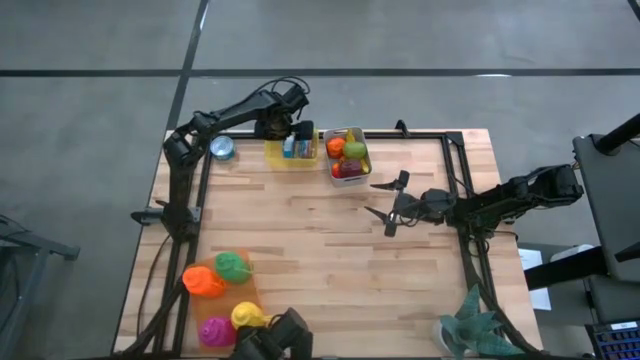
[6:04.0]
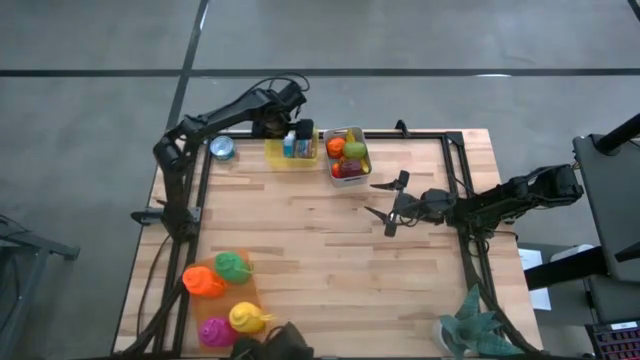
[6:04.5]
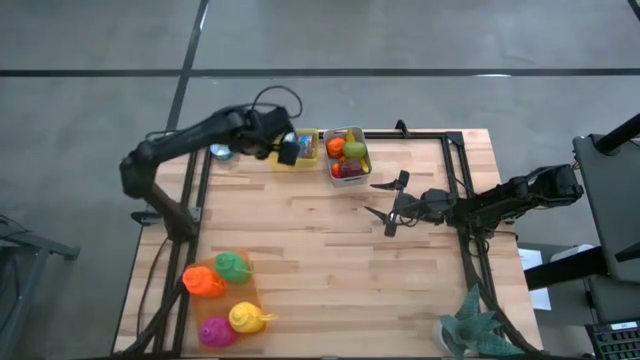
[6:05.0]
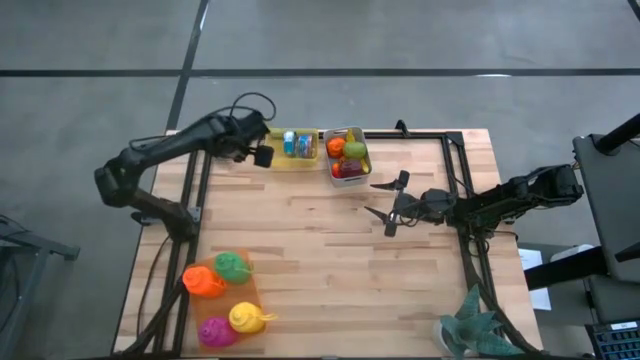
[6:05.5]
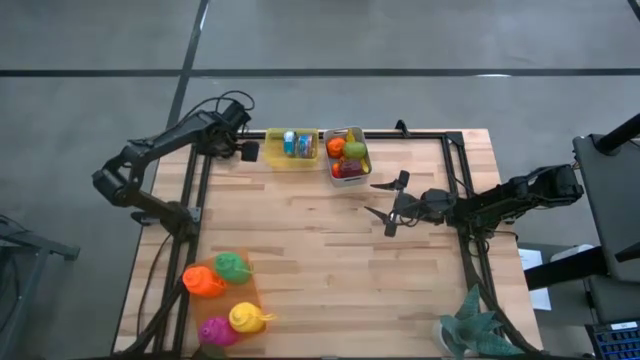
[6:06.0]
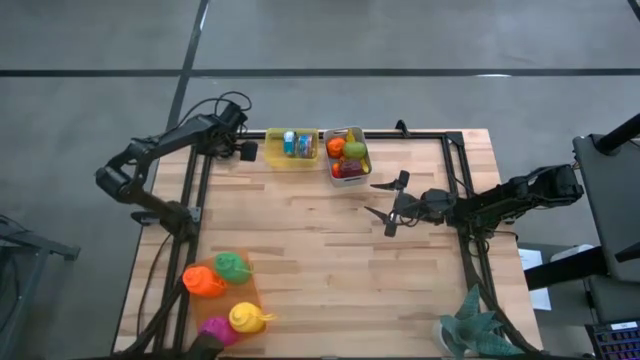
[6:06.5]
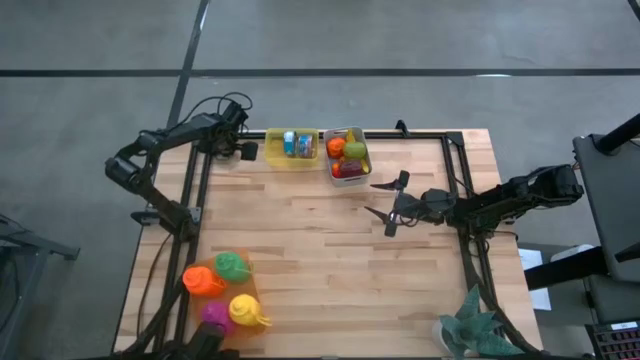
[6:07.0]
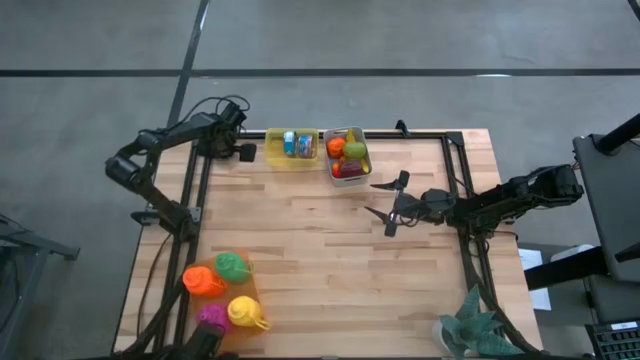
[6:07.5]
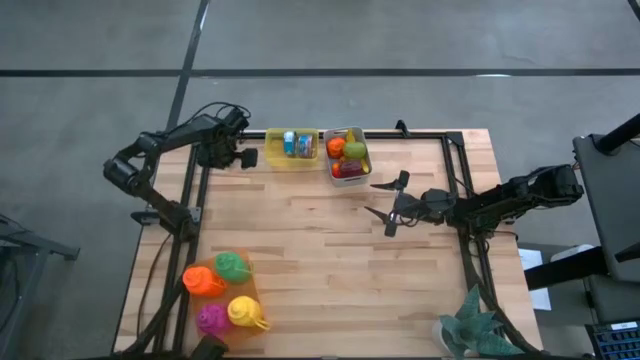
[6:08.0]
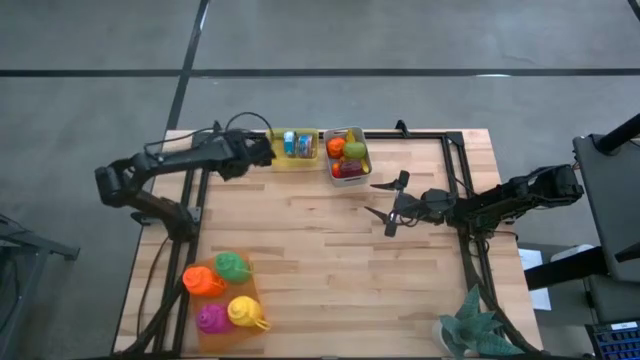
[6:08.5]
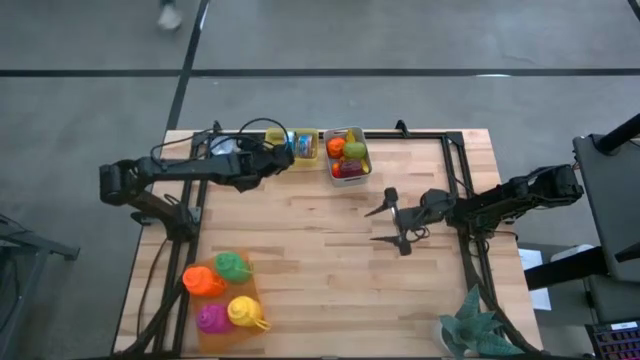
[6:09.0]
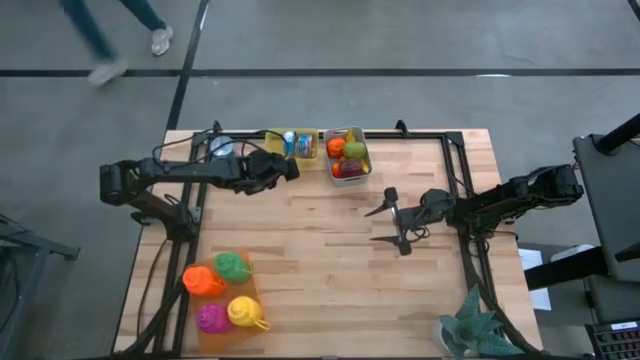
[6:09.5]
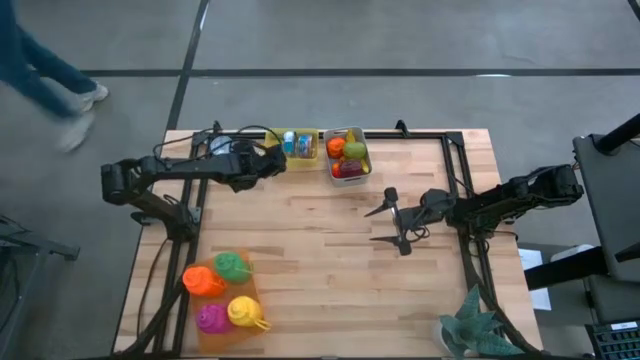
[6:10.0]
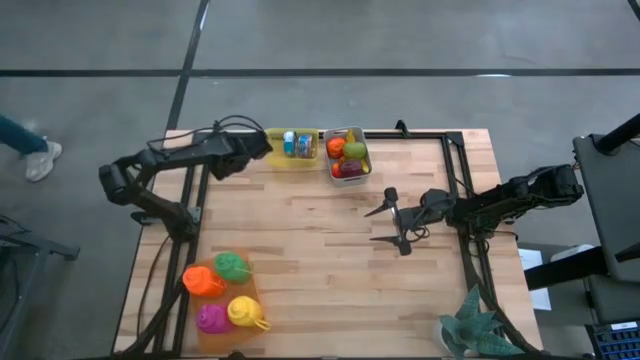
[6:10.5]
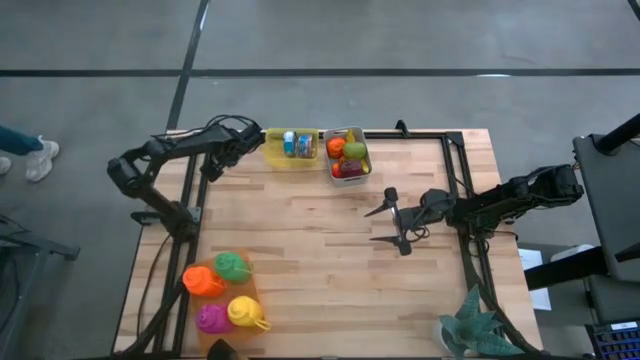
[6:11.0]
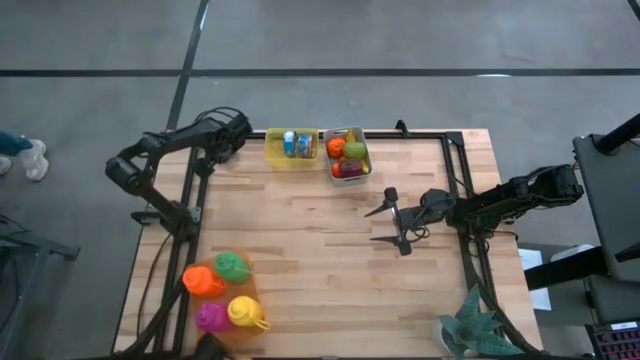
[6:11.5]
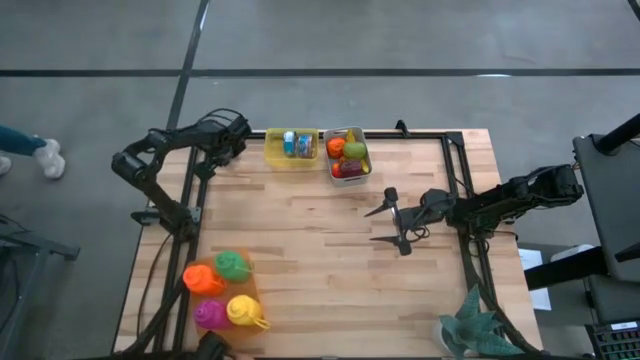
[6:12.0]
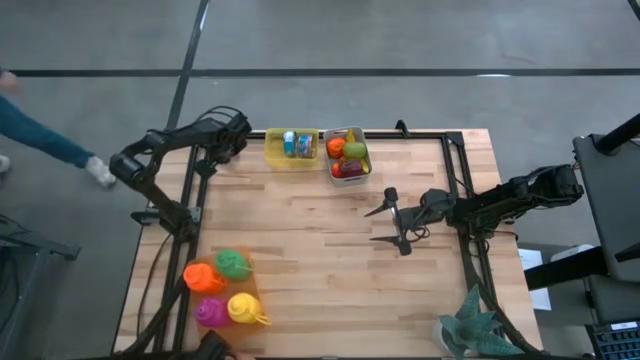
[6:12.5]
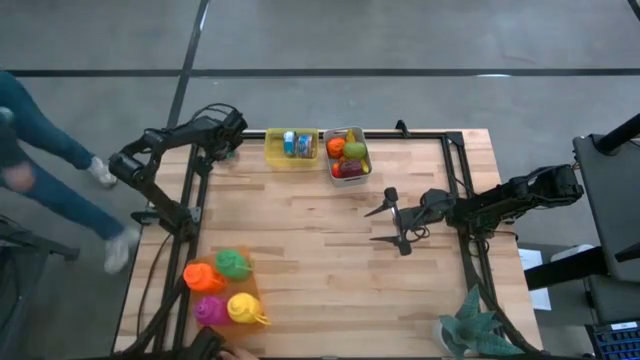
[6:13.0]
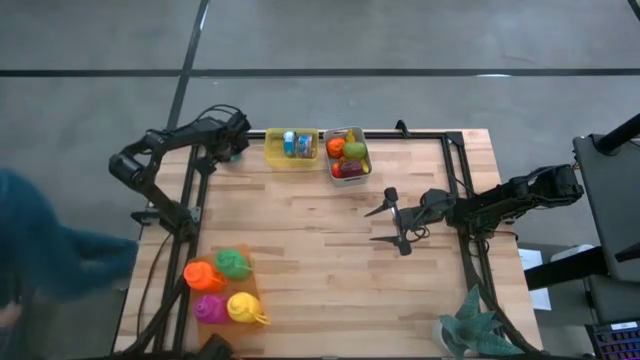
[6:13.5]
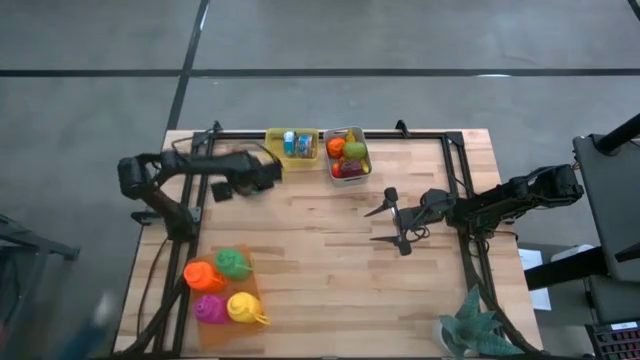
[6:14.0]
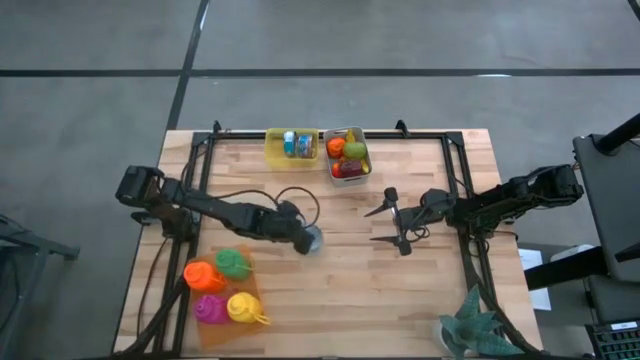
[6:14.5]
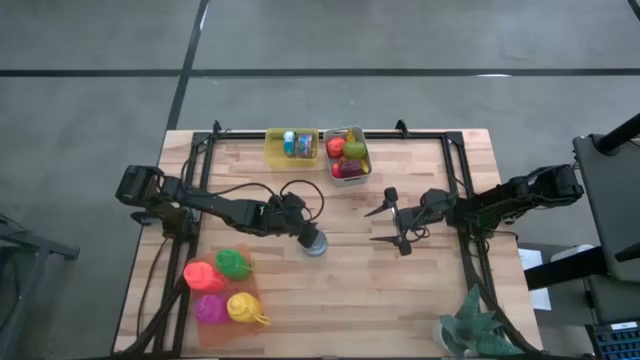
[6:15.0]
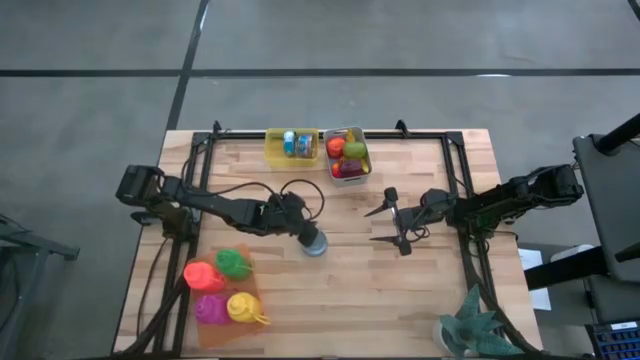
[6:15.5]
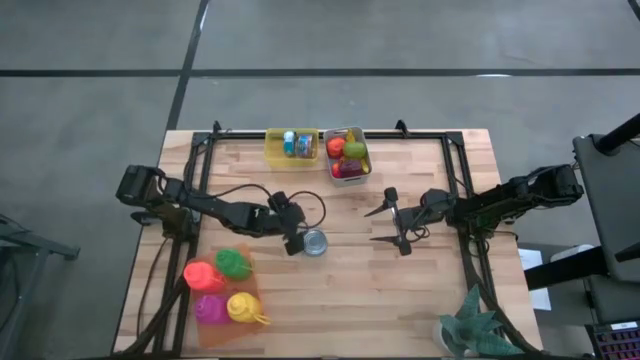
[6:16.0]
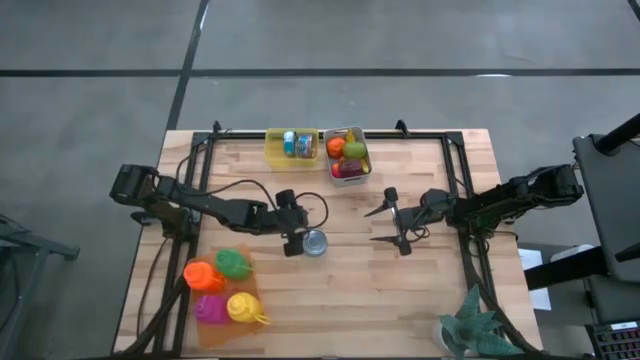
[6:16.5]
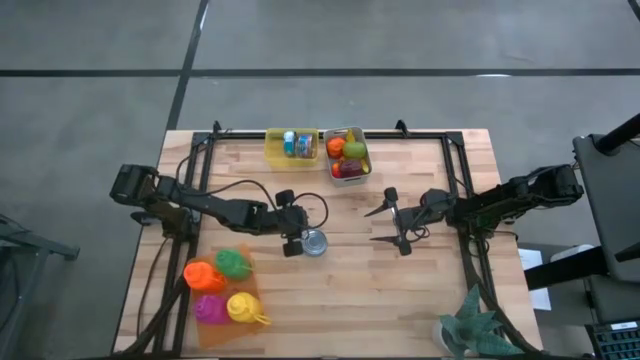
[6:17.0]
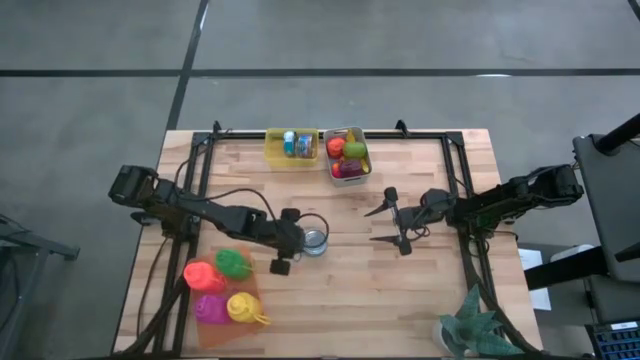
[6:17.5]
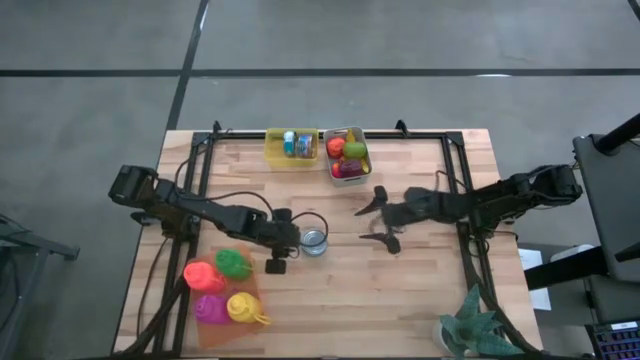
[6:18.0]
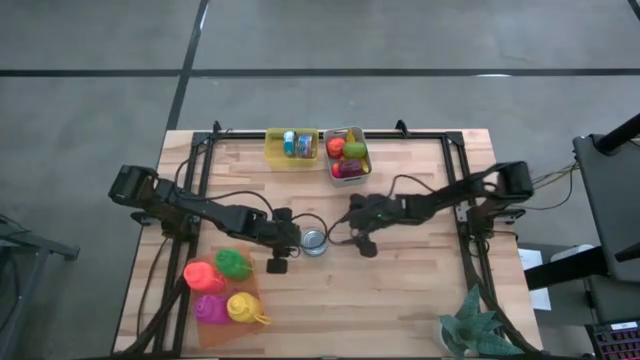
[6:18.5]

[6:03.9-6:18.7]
Task: Pick & Place Food Item
Put the blue tuna can into the yellow bin

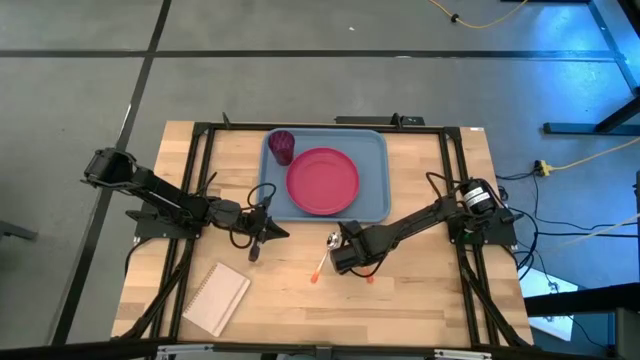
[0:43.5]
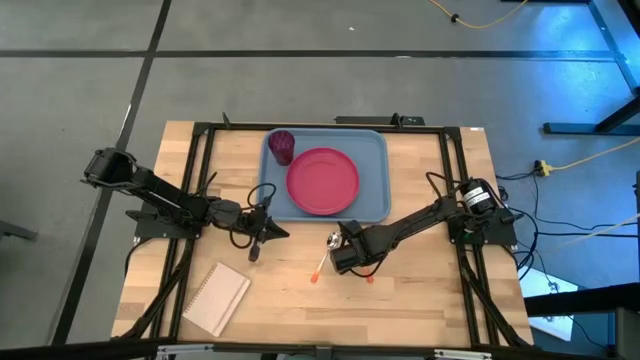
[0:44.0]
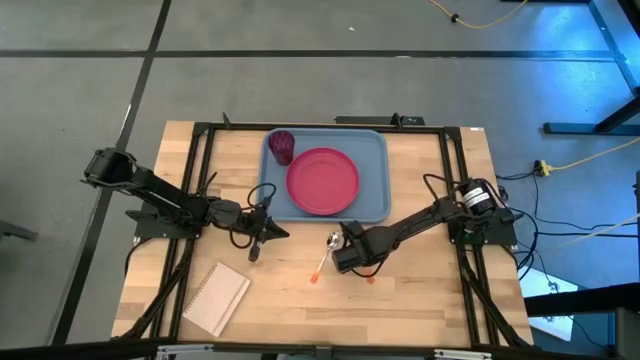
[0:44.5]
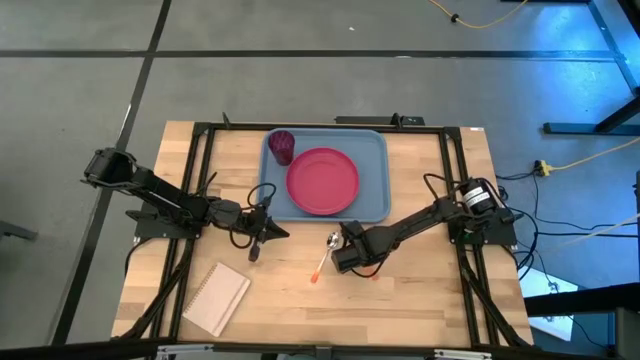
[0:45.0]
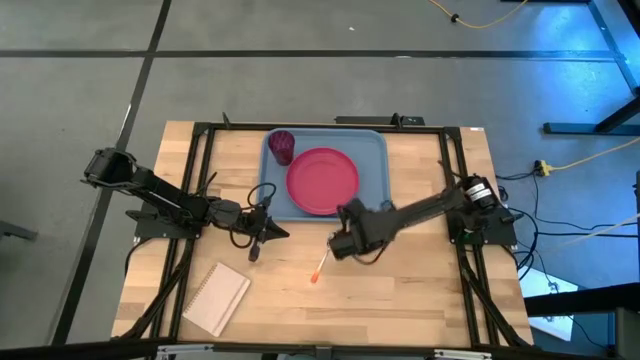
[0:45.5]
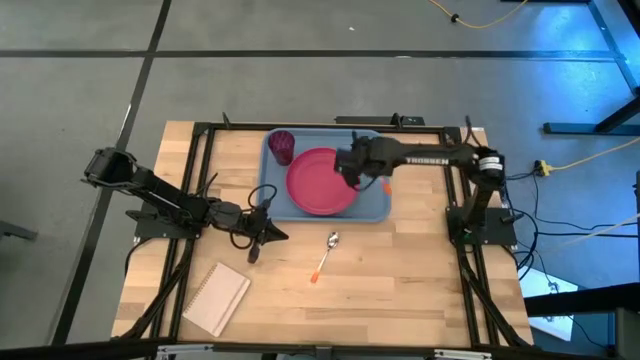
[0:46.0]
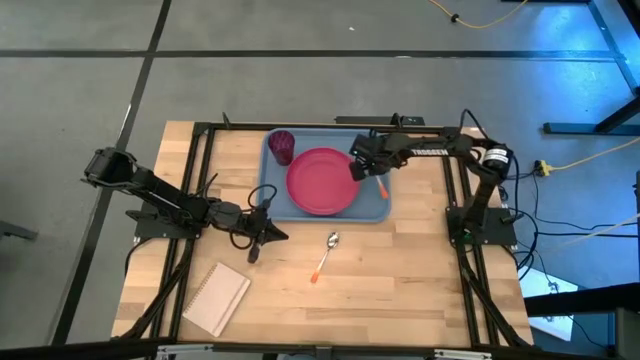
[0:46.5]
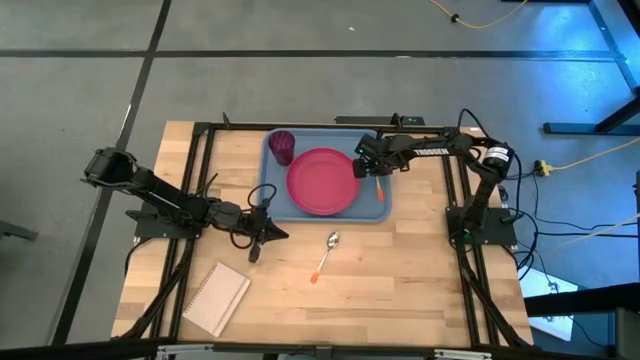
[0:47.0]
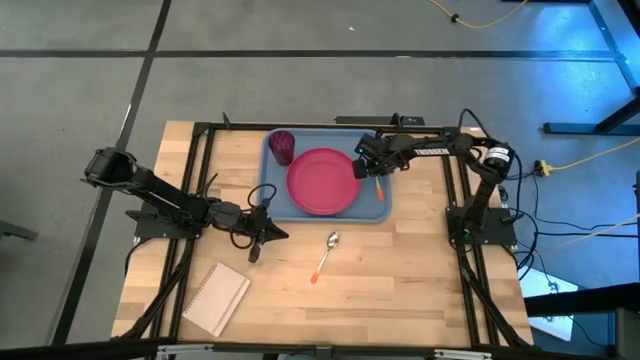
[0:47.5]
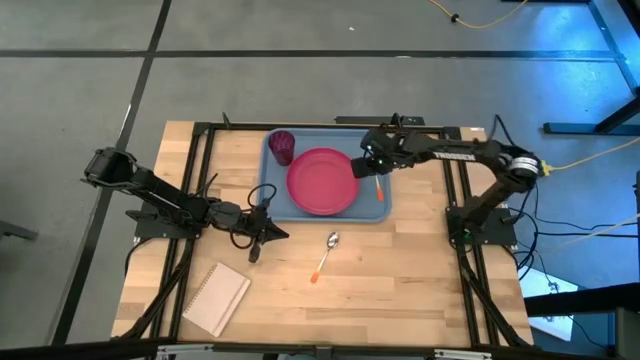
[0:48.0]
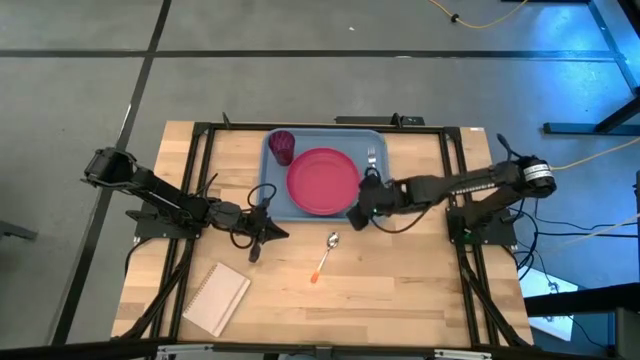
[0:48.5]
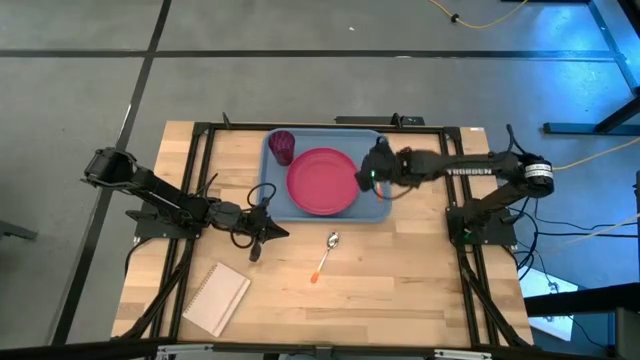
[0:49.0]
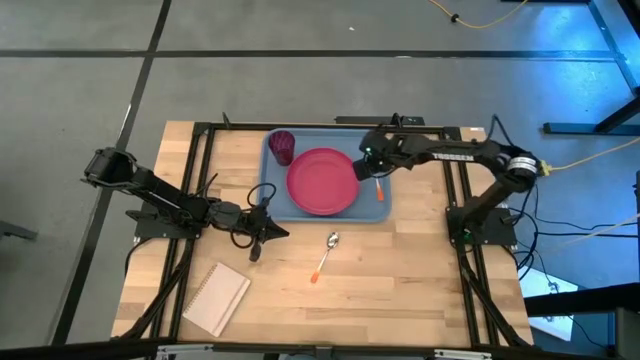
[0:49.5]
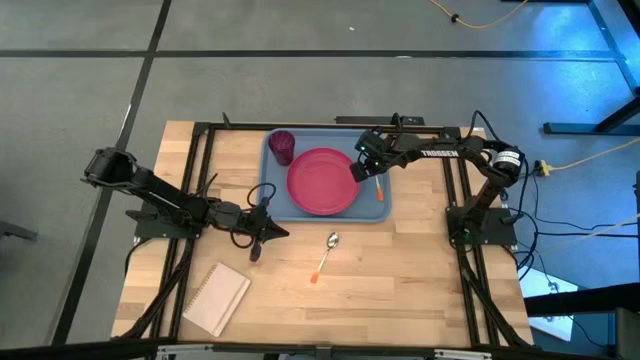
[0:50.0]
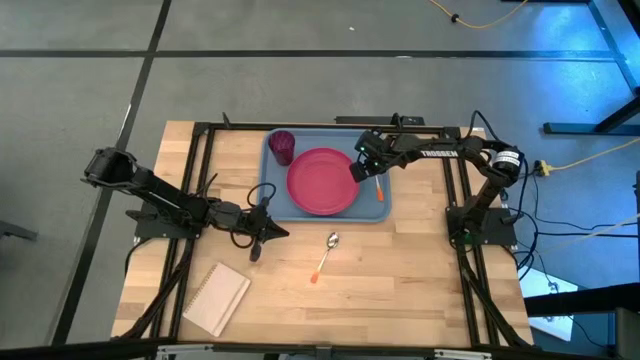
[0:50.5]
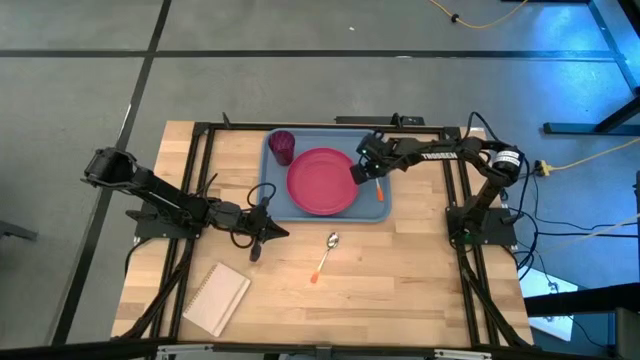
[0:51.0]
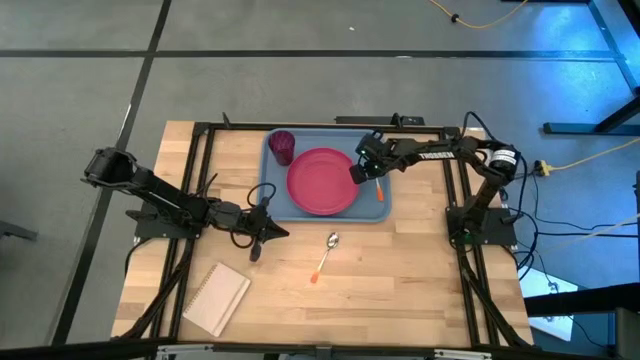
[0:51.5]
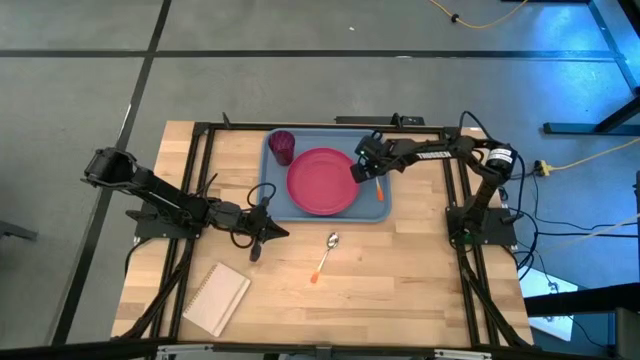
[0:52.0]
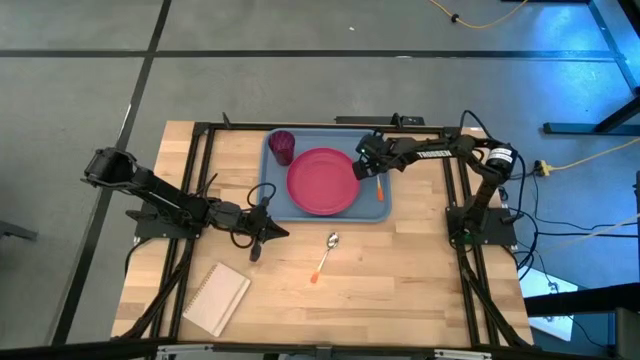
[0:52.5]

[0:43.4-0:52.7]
Task: Pick and place plate/cup/fork/spoon on tray
Put the orange fork on the blue serving tray to the right of the pink plate
